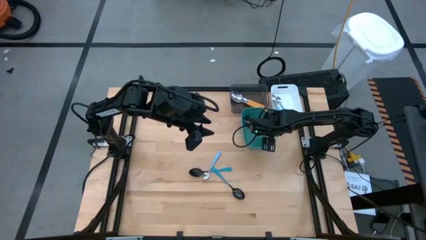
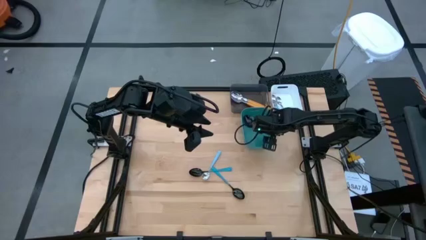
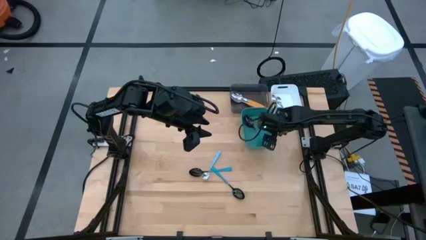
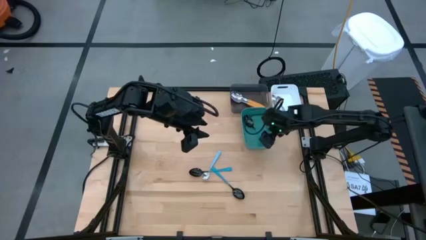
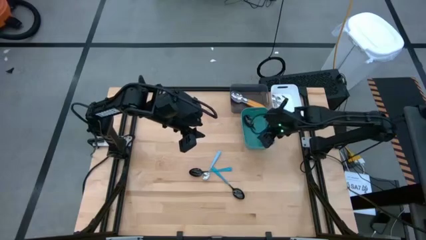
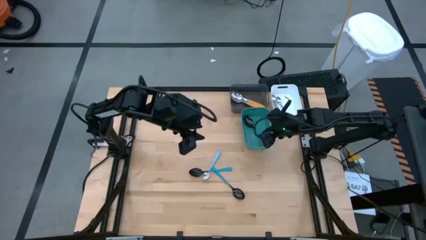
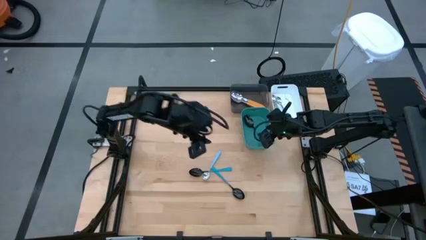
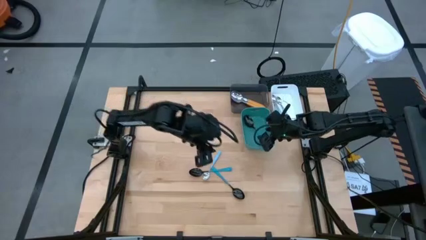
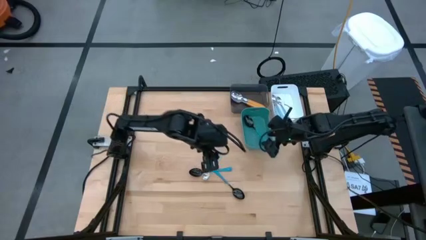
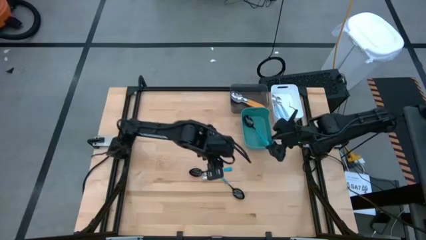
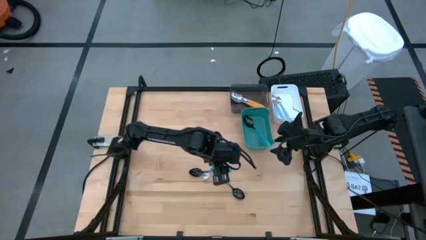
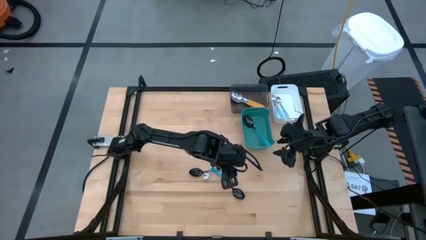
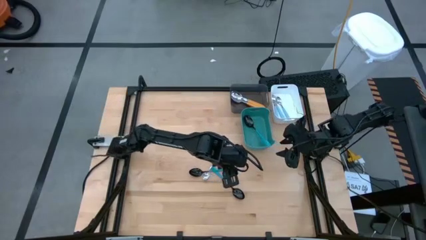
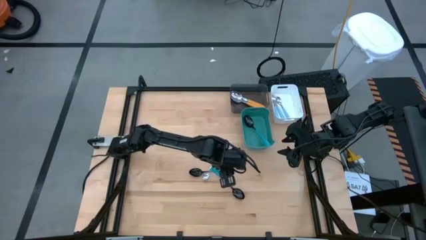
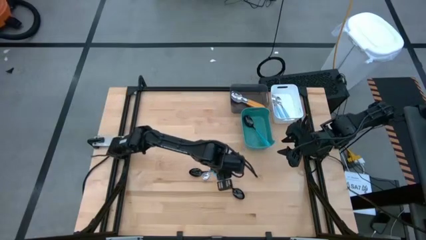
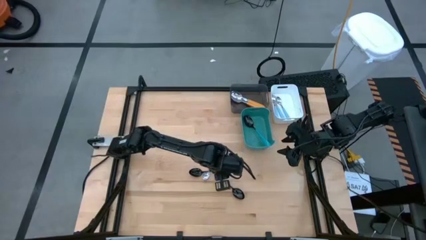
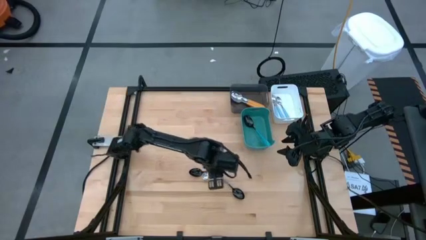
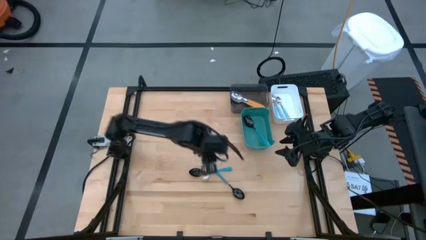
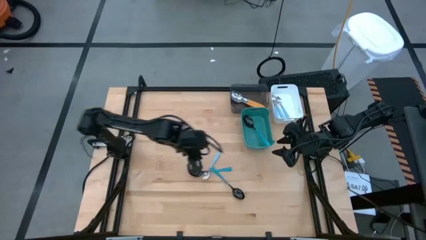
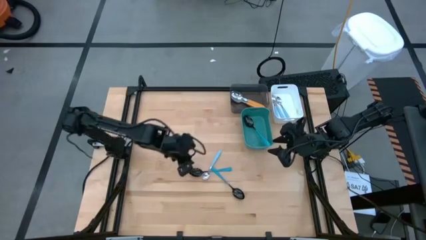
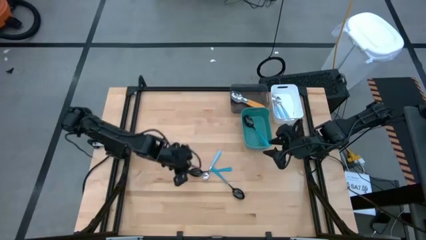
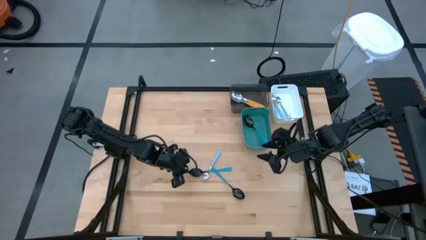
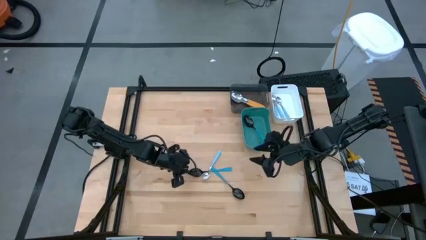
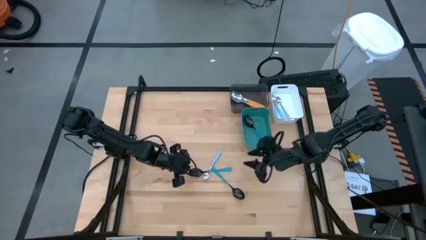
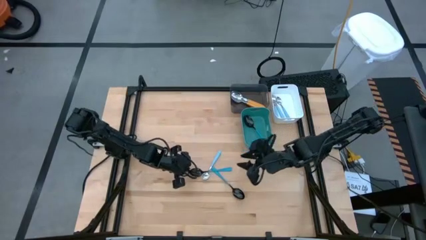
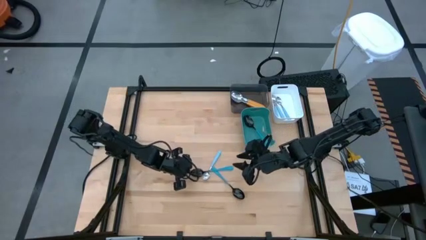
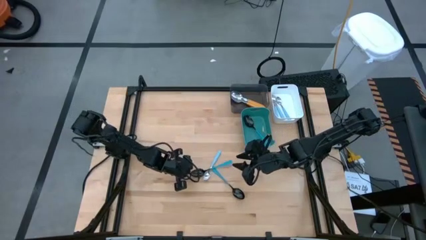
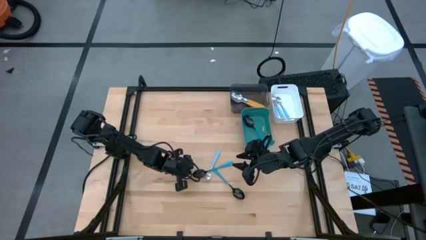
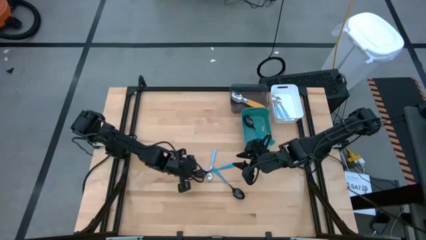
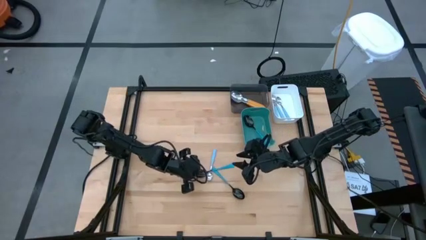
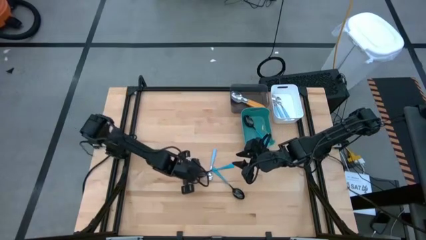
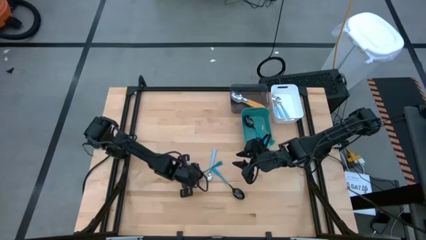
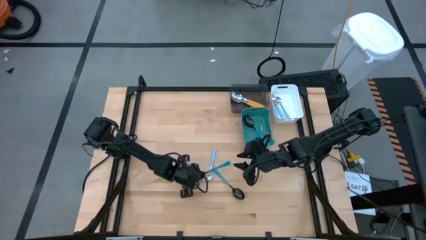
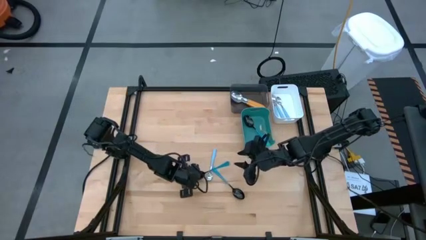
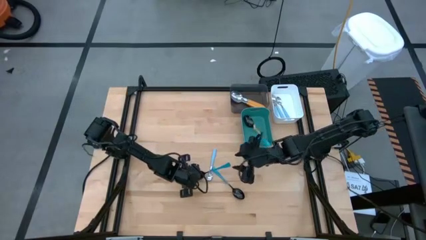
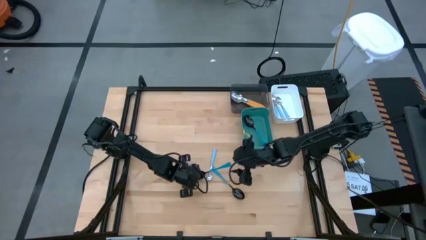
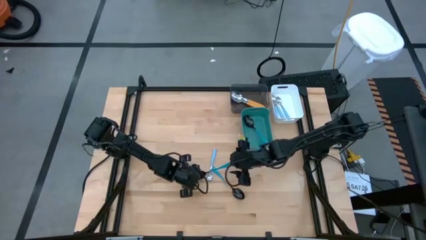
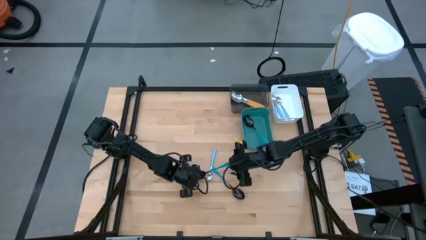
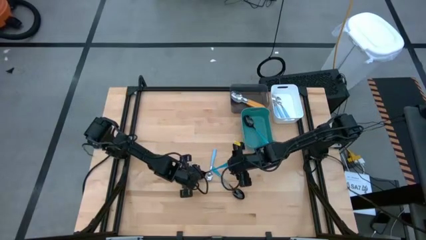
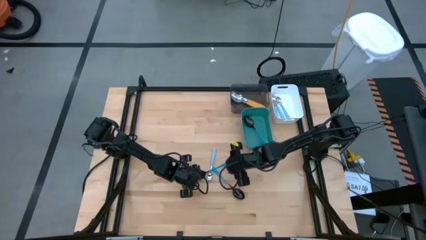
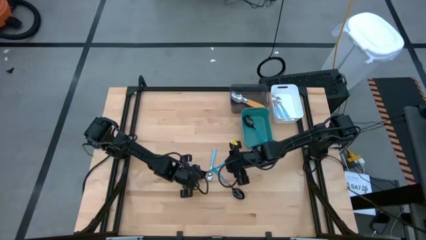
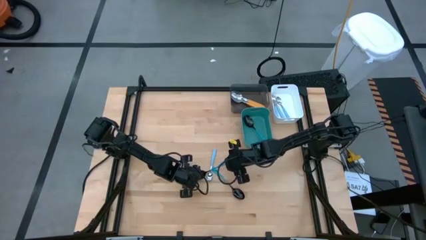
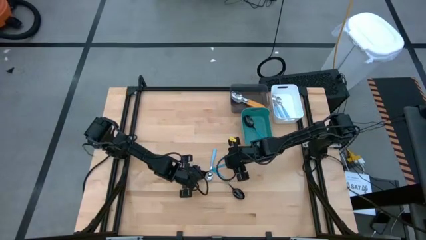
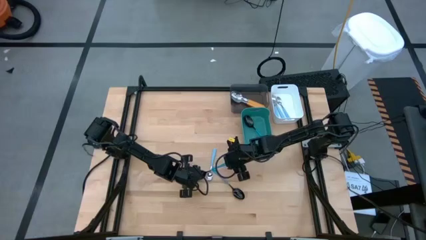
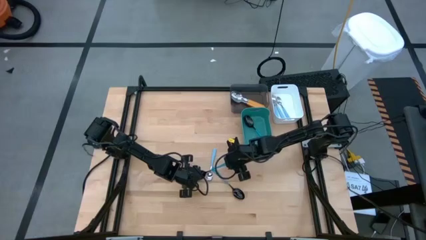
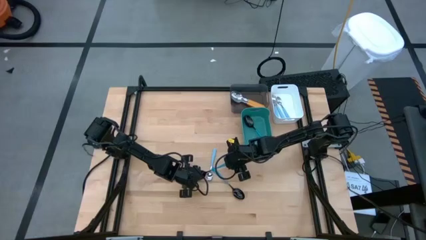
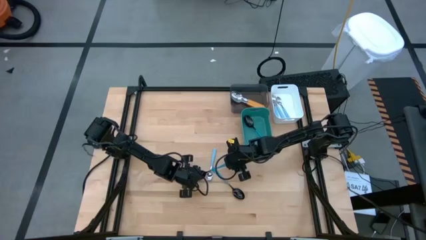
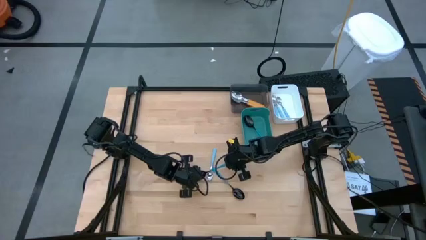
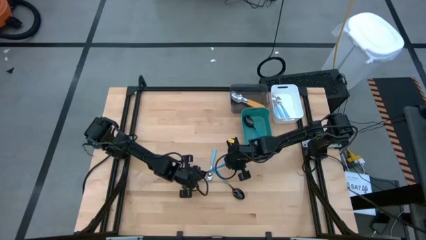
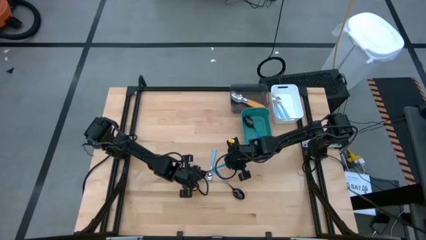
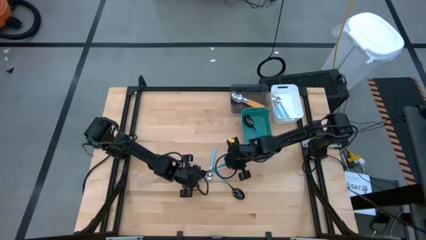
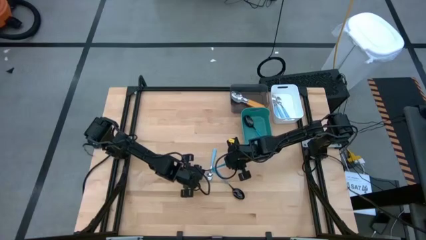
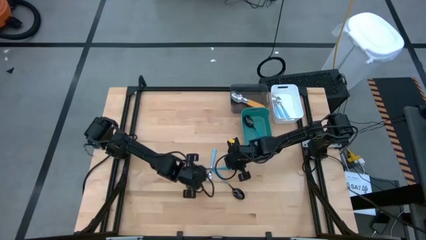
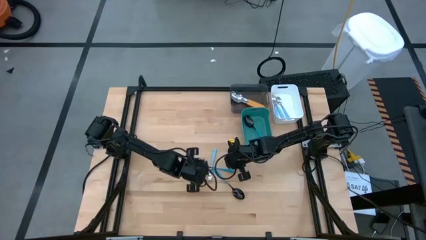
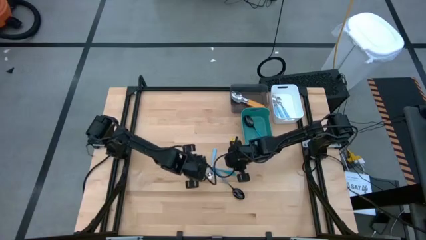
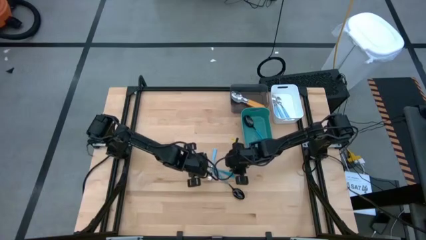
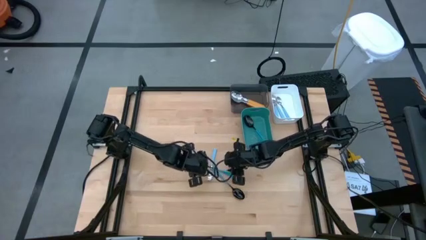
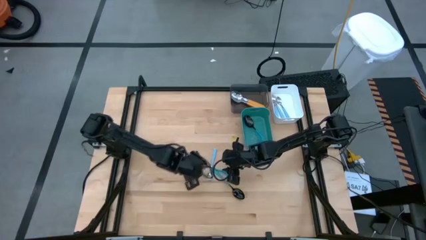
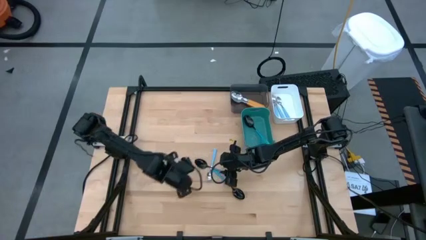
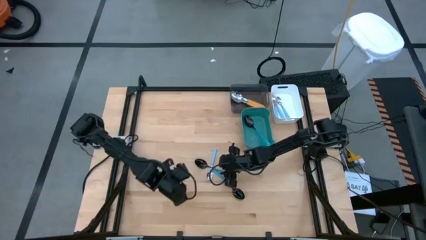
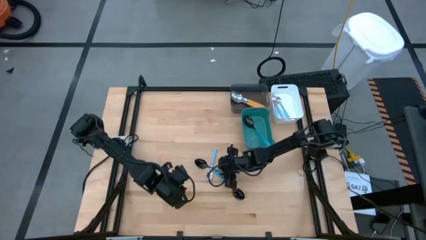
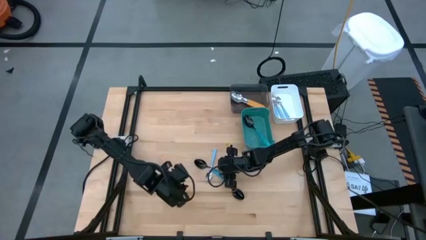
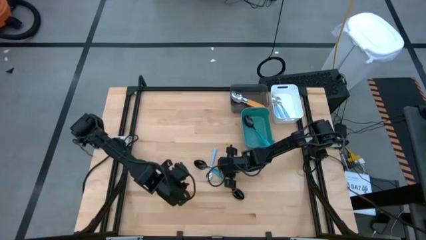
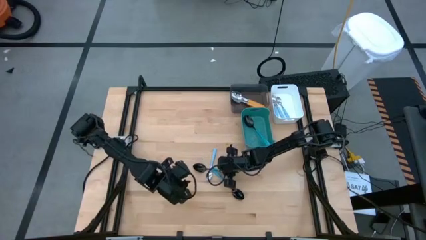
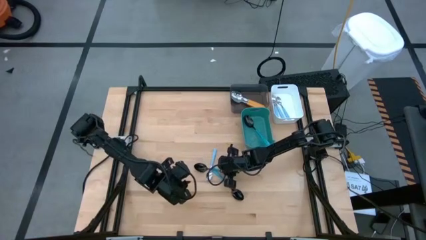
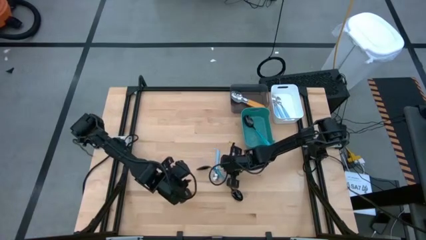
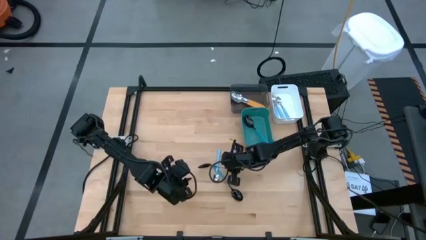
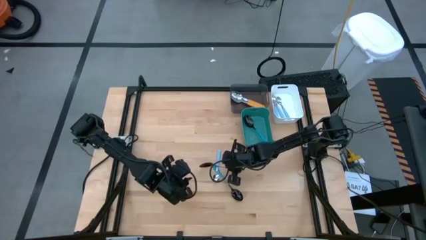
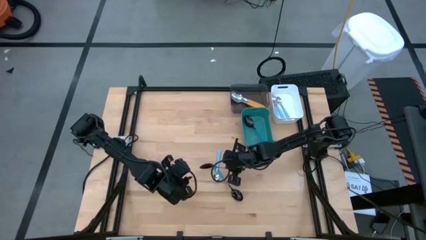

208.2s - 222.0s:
Task: Sort silverware by color (type)
Put the blue spoon into the green bin

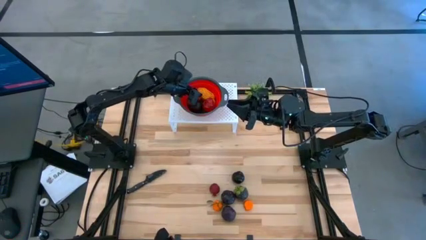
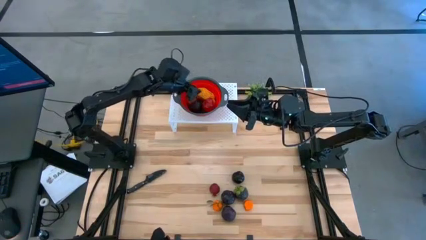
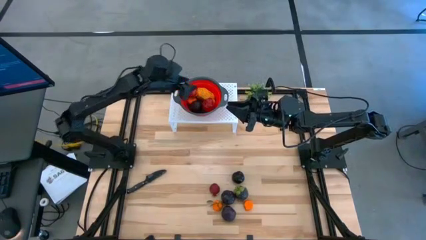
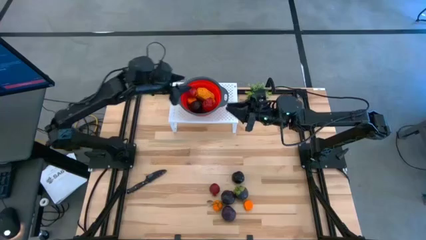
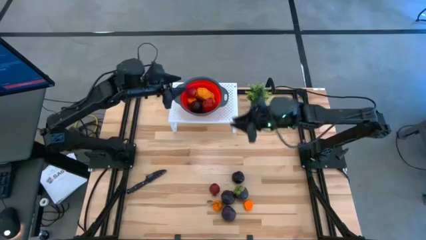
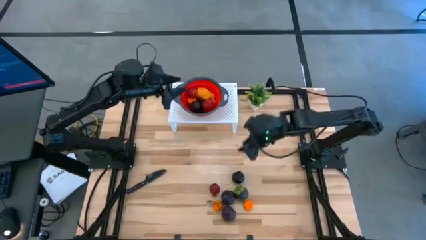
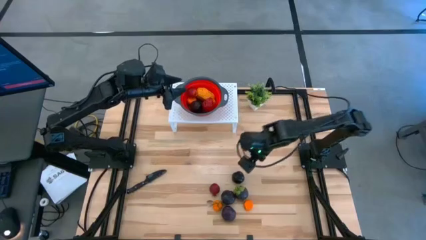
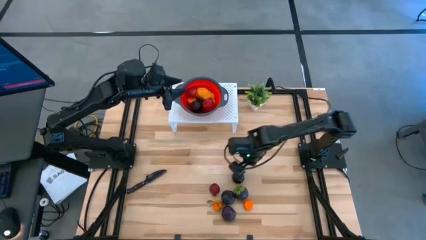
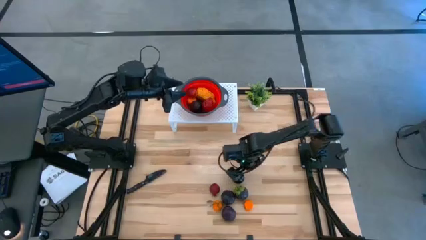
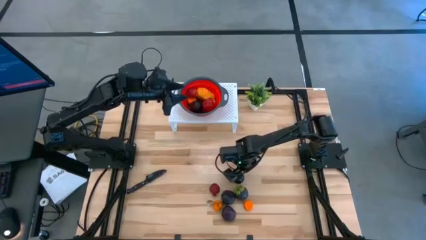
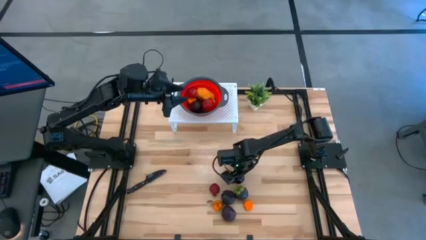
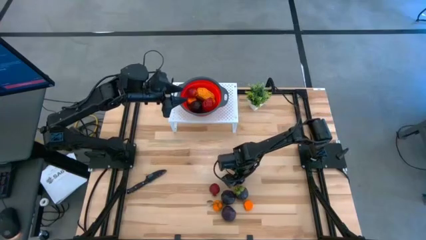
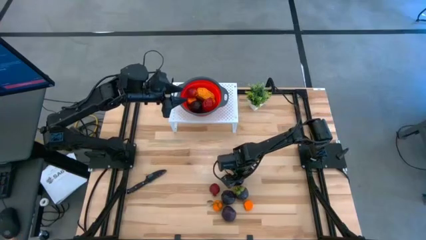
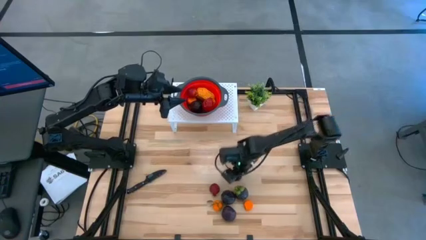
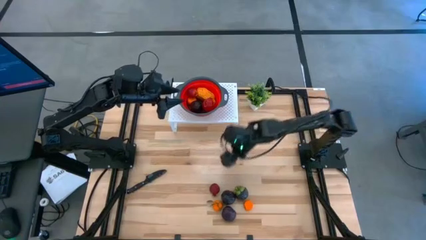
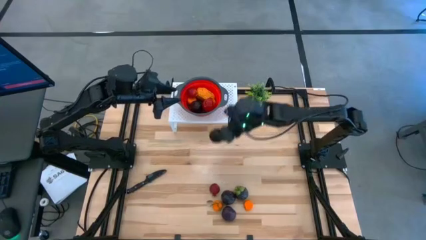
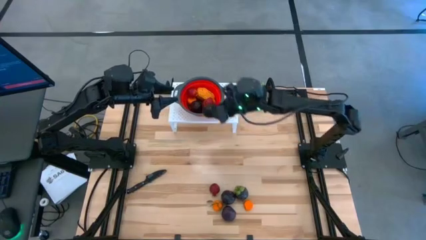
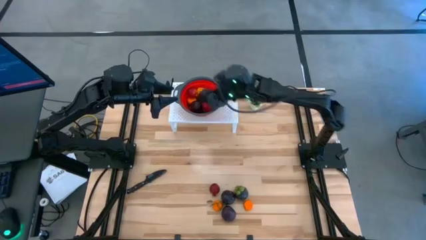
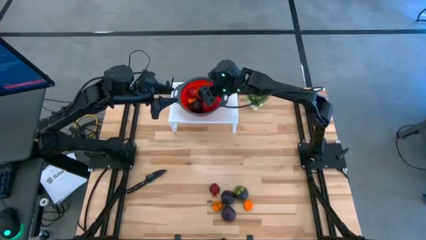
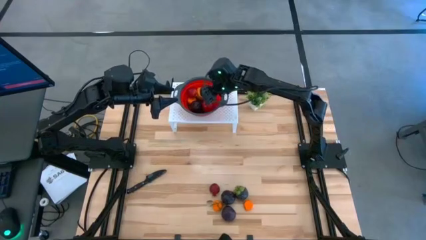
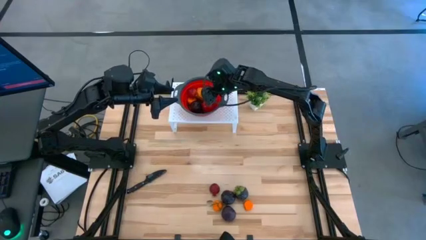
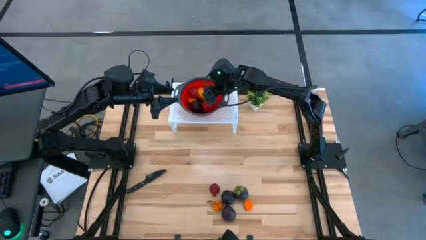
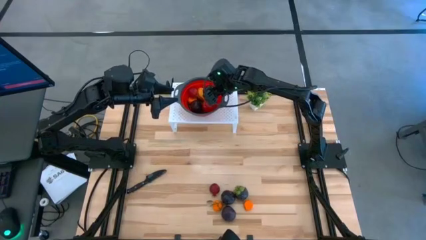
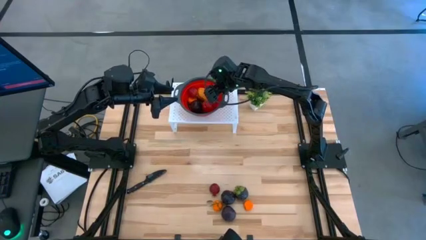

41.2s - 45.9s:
Task: Pick & Place Fruit
Put the purple plum into the red strainer bowl on the shelf
